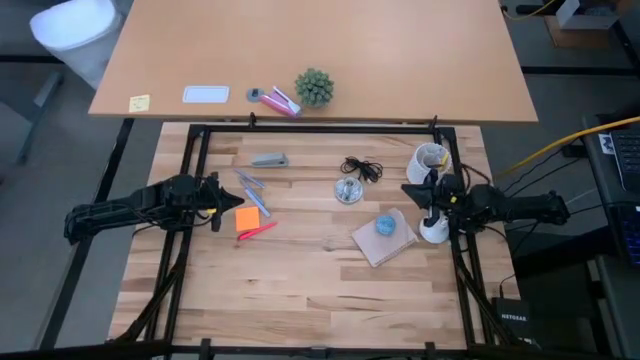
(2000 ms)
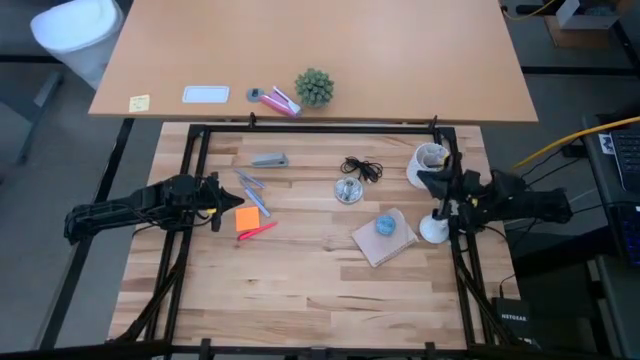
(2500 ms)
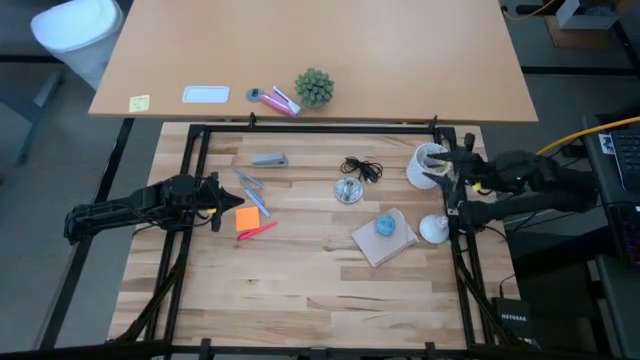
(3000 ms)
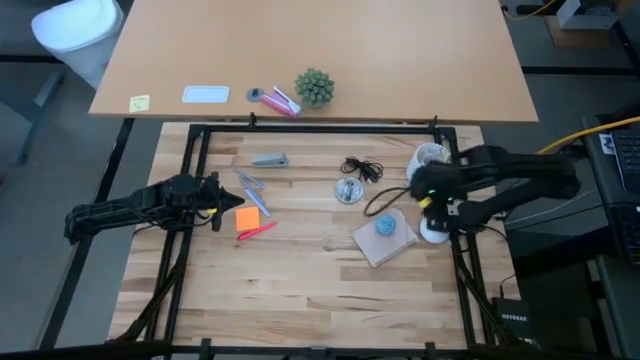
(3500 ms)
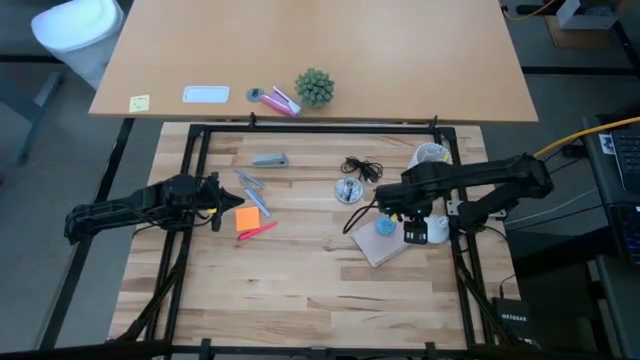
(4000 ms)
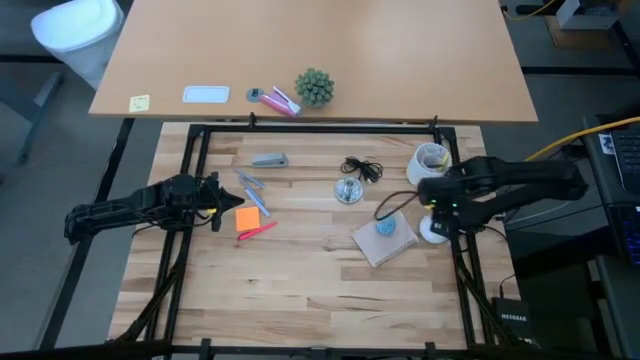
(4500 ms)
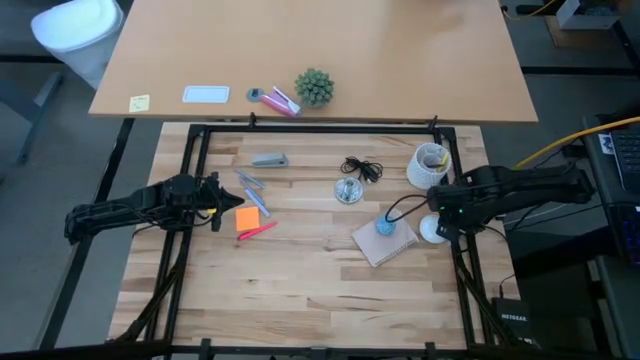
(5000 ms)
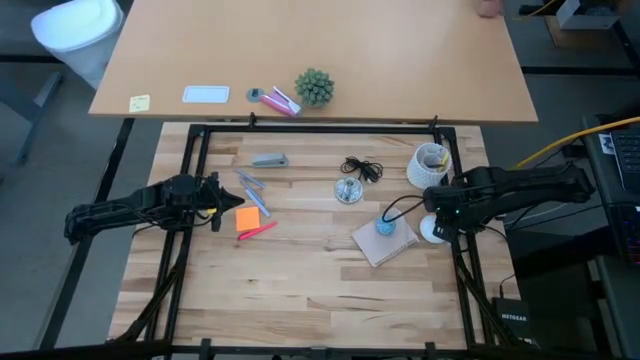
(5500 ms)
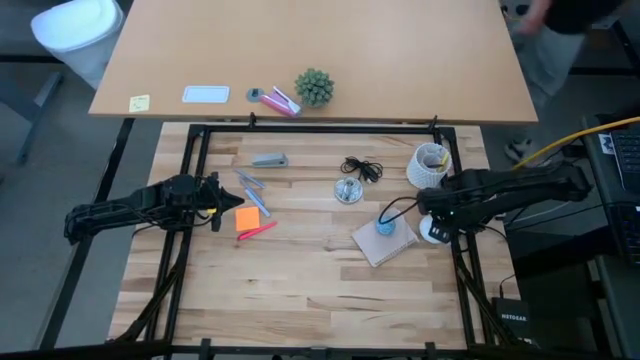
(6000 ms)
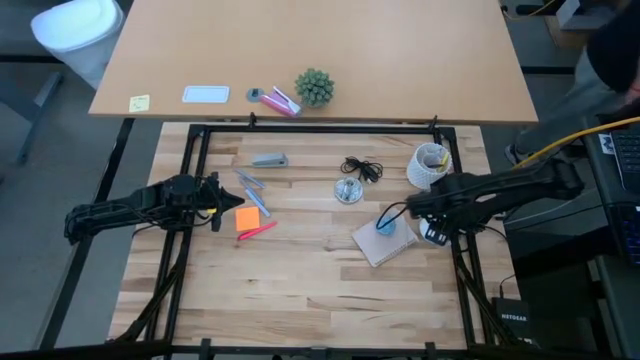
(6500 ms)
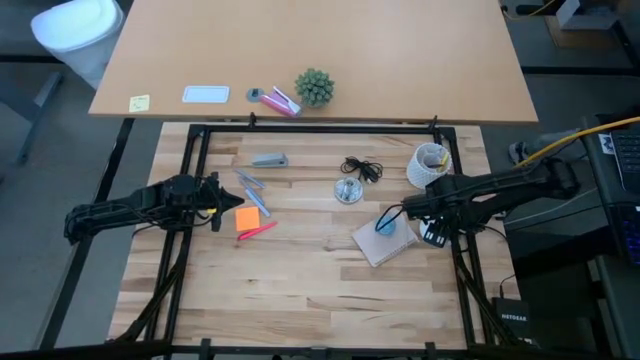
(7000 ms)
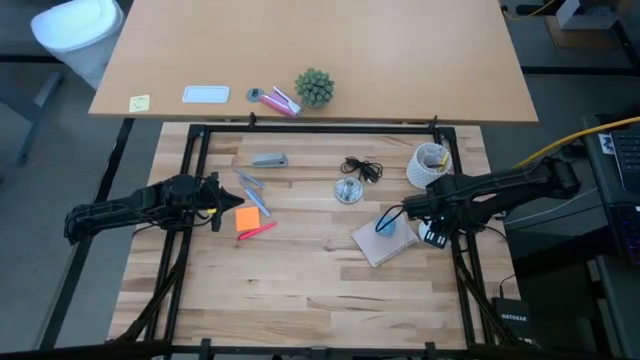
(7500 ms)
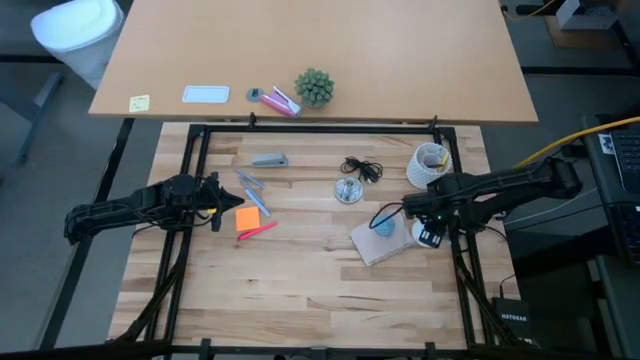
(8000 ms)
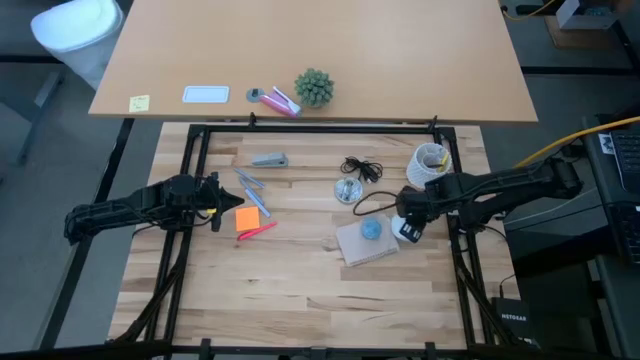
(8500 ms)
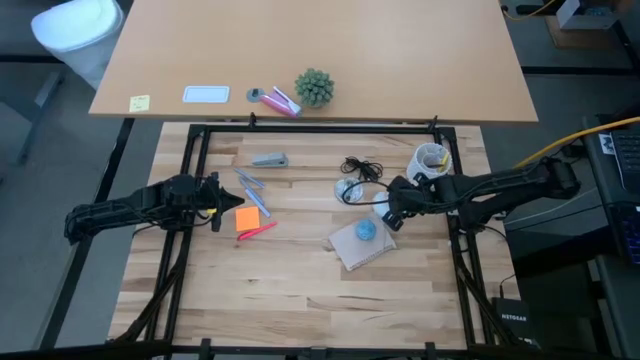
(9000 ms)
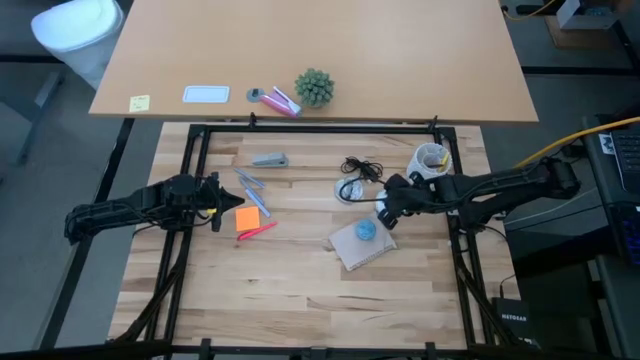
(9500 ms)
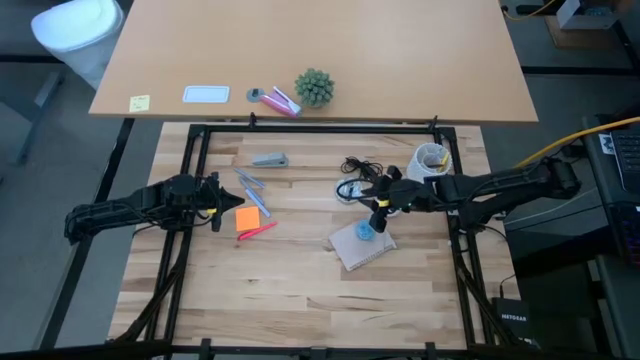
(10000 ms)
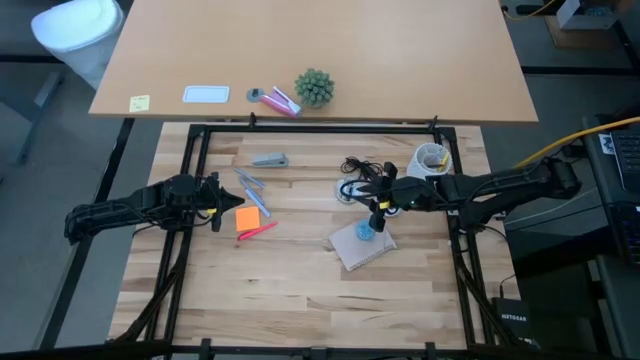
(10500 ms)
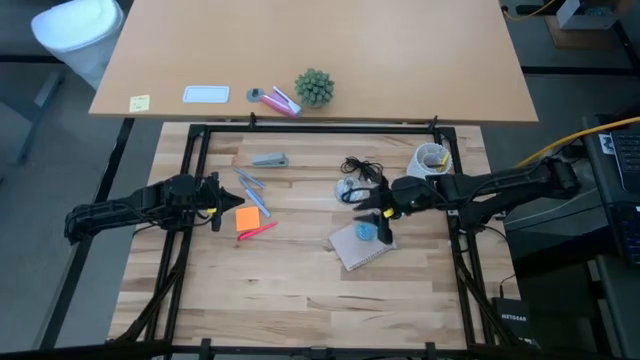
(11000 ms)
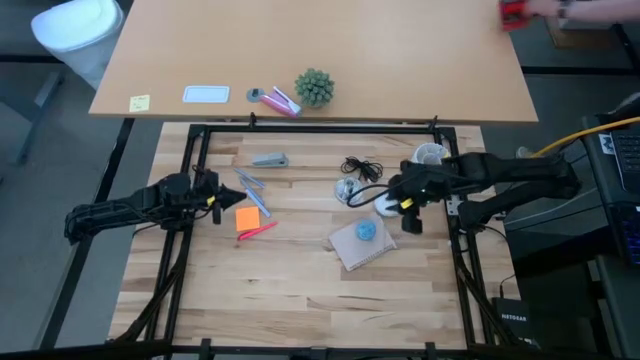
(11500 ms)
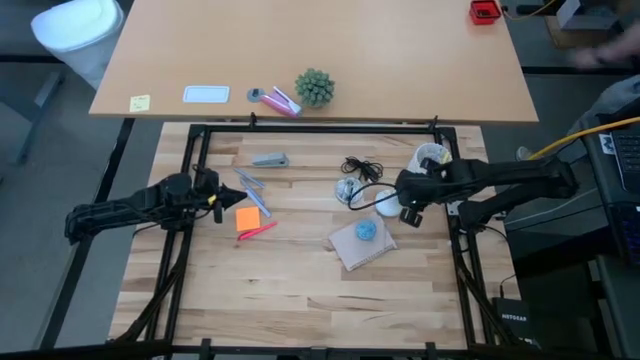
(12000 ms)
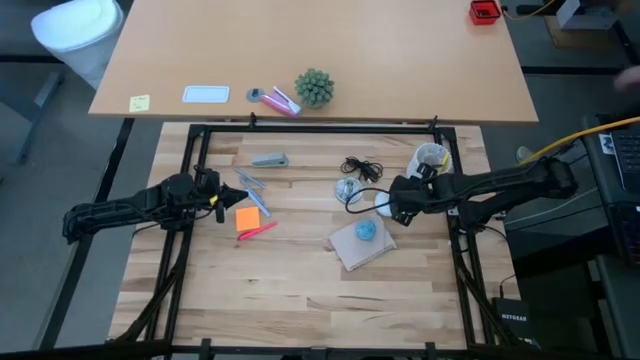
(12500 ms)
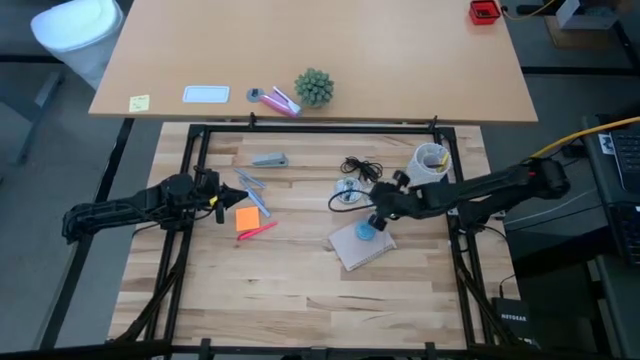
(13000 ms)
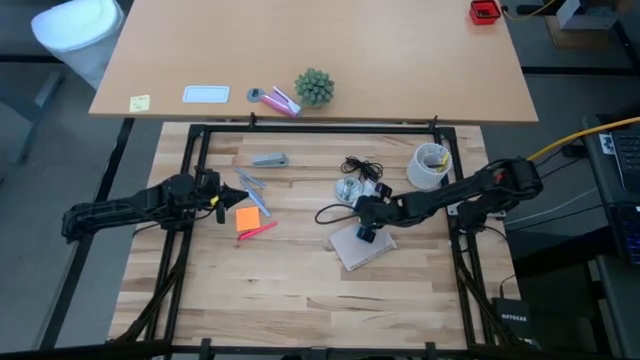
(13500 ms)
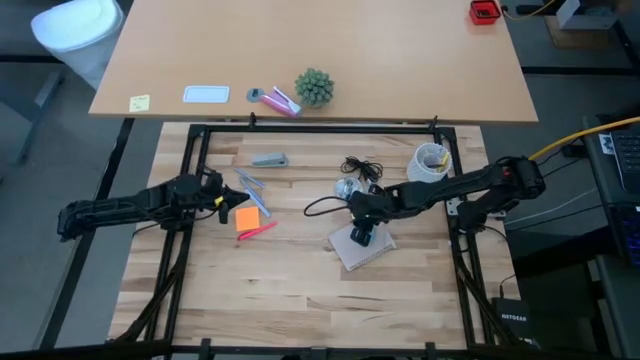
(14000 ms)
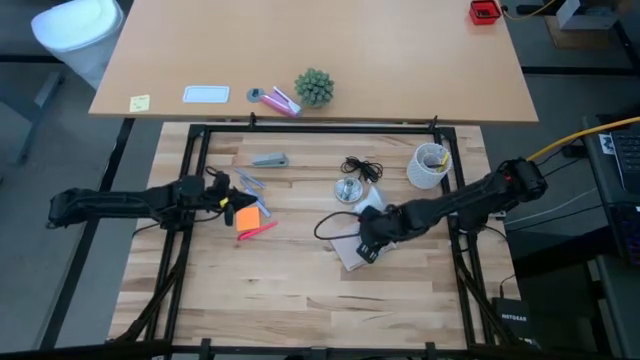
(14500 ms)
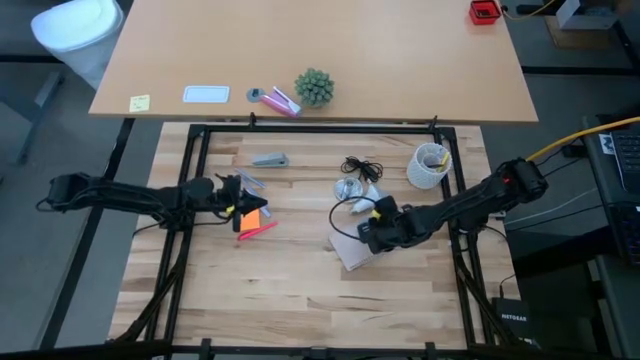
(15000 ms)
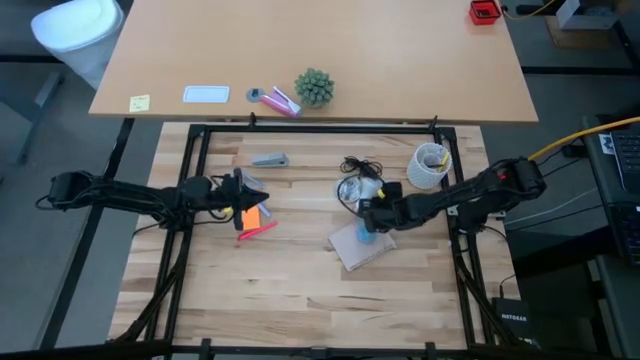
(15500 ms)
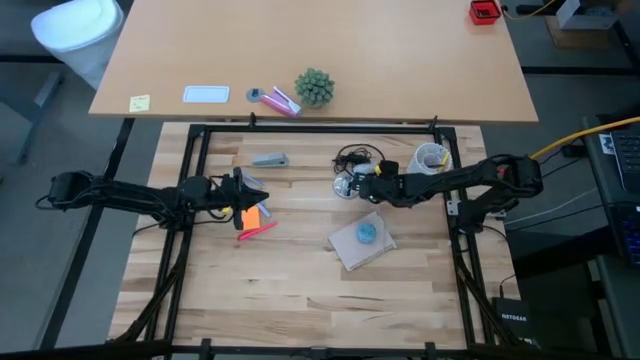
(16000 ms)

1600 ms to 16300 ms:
Task: Screw lightbulb
Insert the lightbulb into the lamp

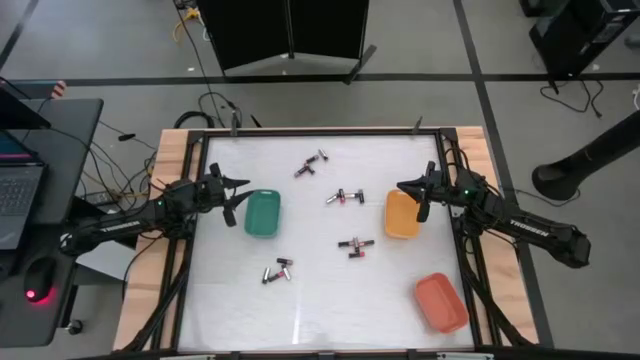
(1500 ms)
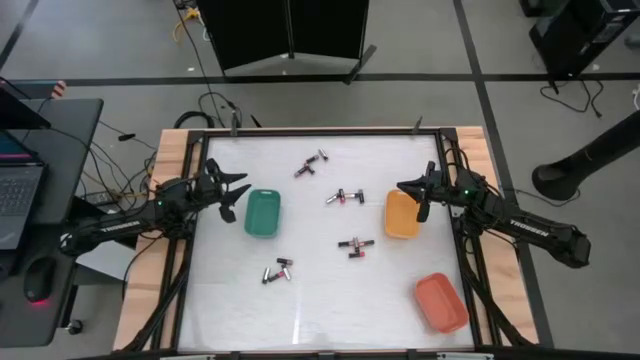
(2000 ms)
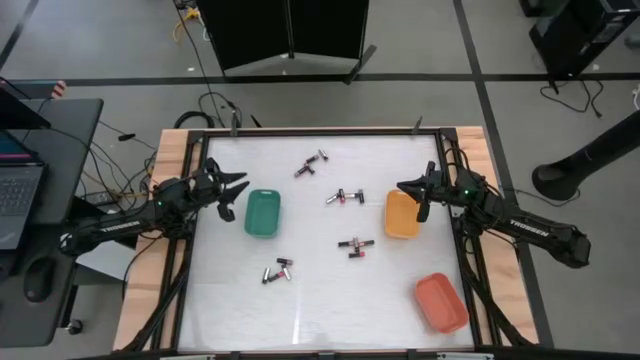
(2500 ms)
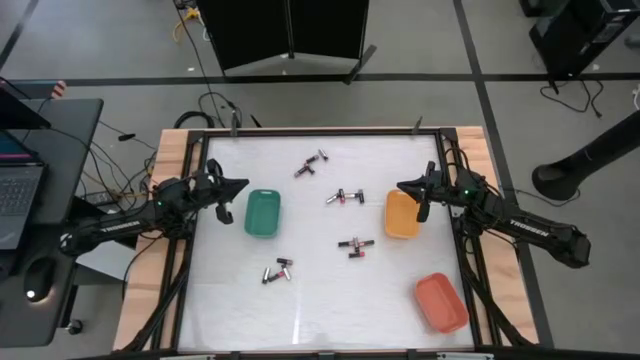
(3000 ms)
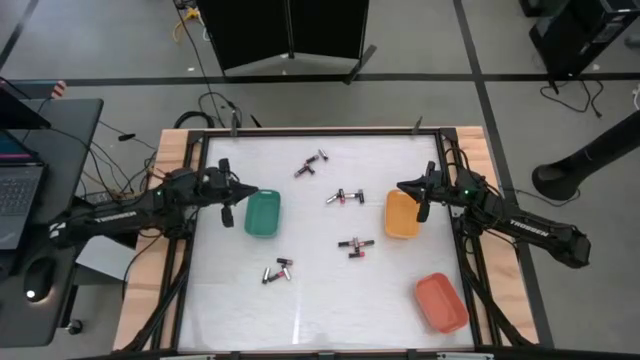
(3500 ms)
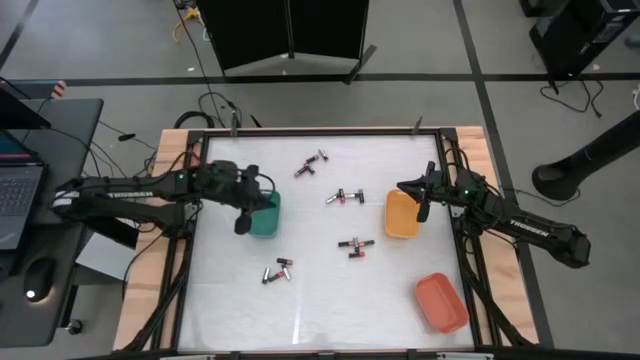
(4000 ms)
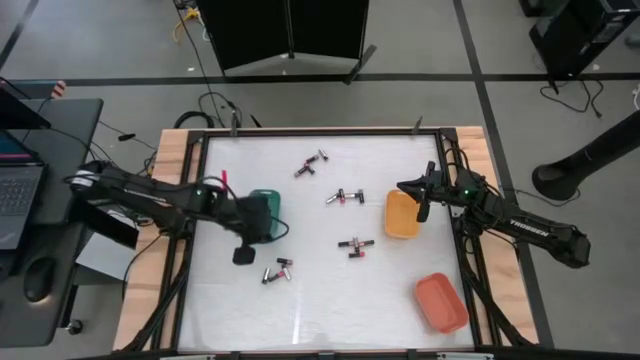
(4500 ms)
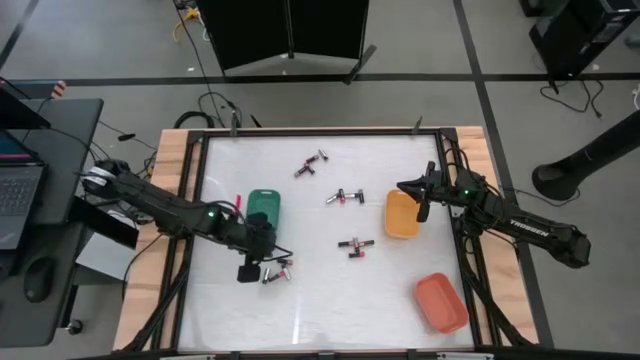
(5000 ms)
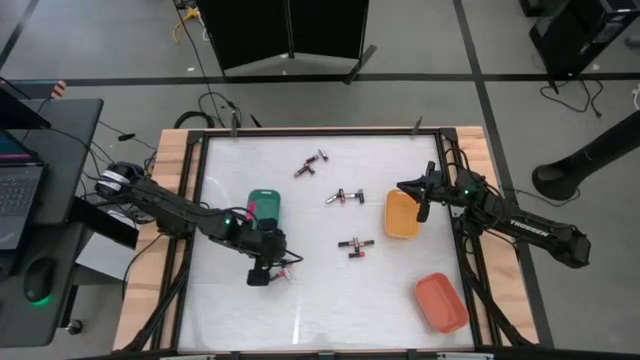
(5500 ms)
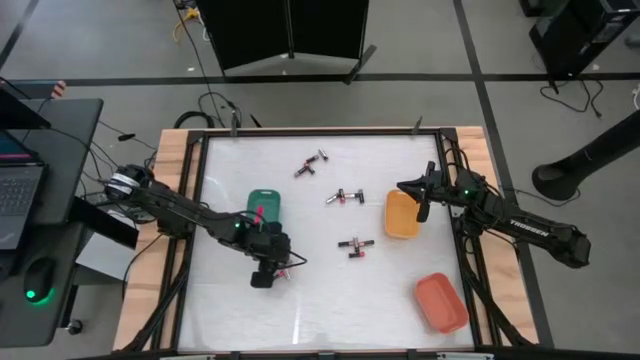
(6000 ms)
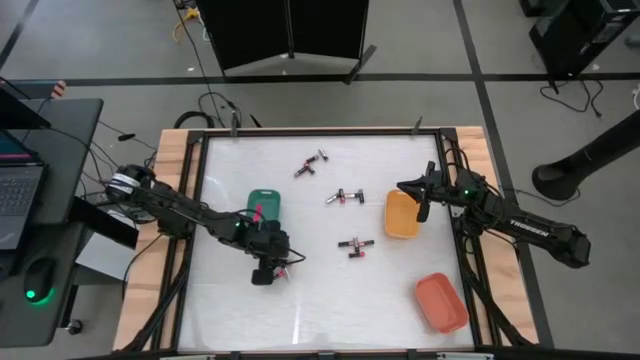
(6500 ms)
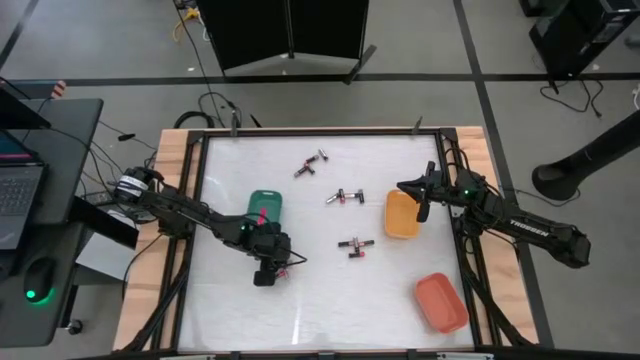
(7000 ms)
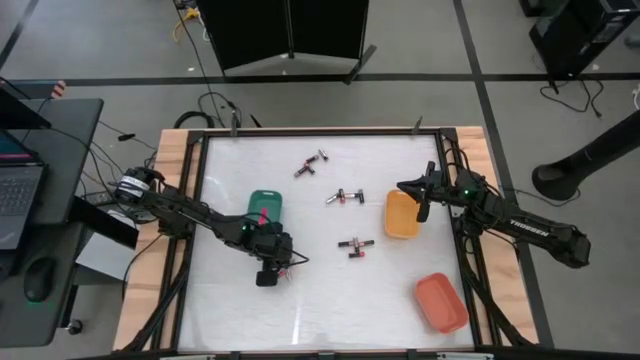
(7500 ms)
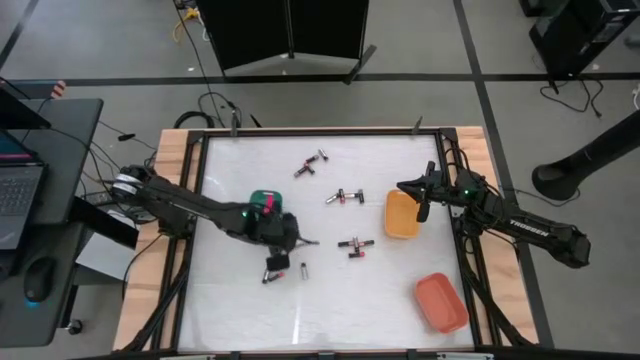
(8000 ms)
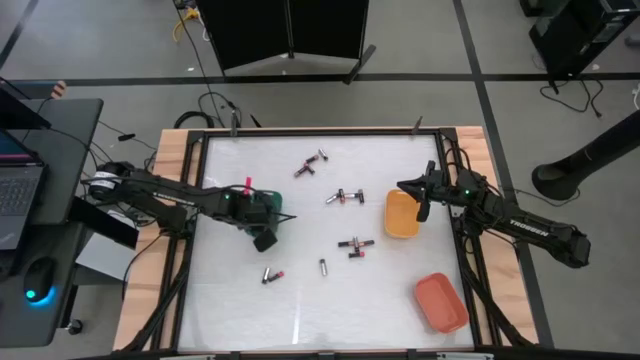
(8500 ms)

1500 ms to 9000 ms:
Task: Sort batteries
Put the black and copper battery into the green bin
